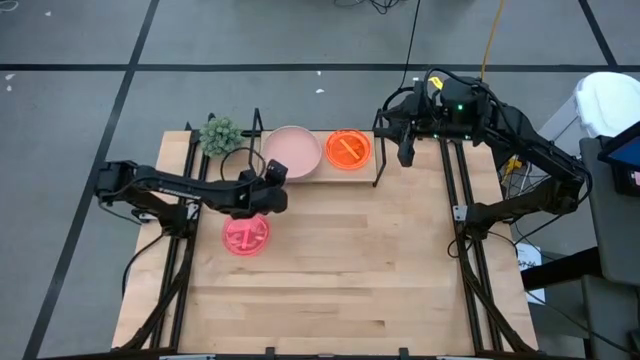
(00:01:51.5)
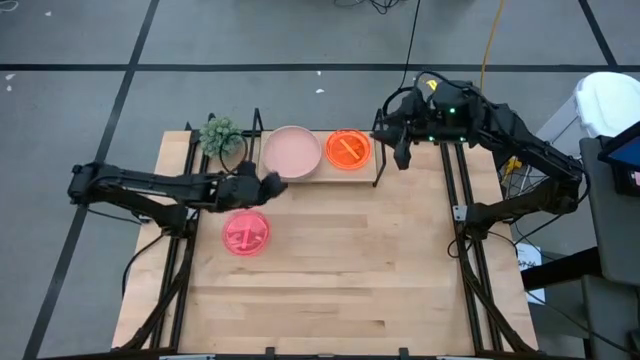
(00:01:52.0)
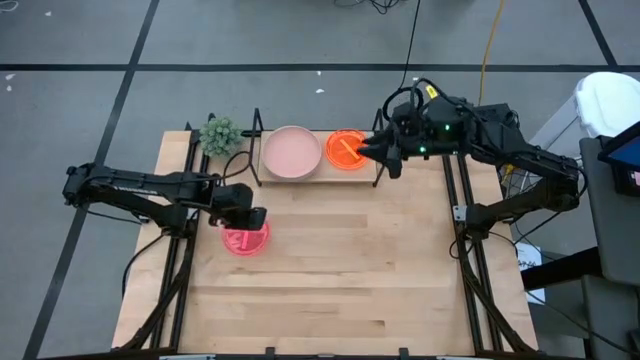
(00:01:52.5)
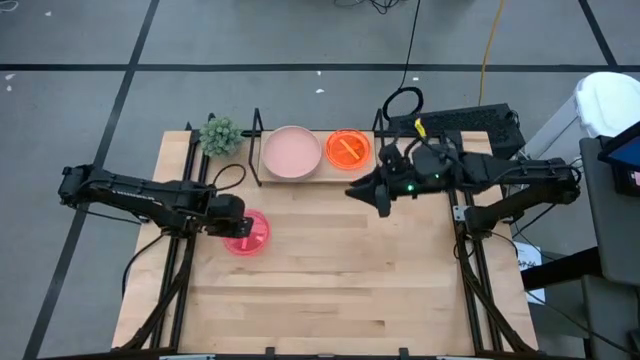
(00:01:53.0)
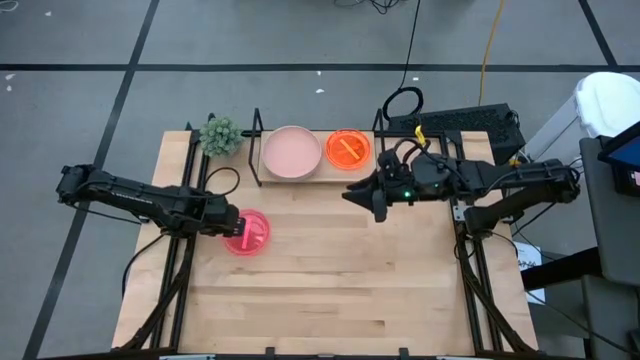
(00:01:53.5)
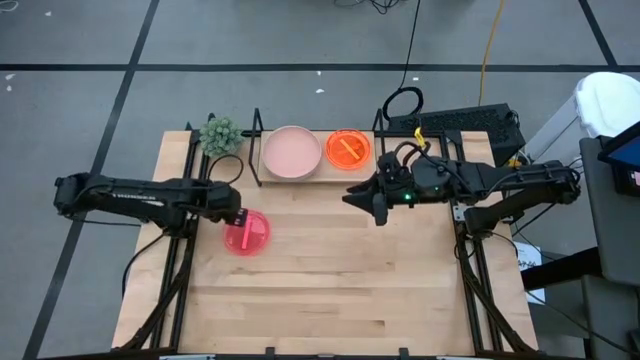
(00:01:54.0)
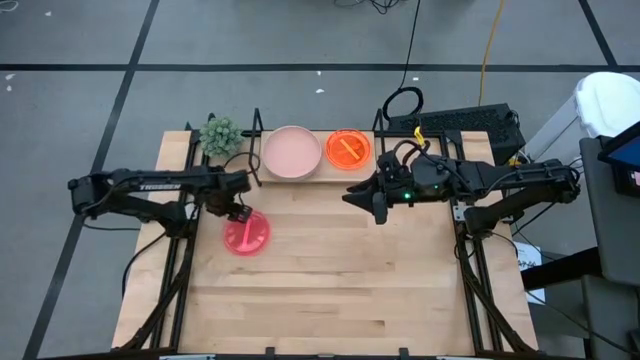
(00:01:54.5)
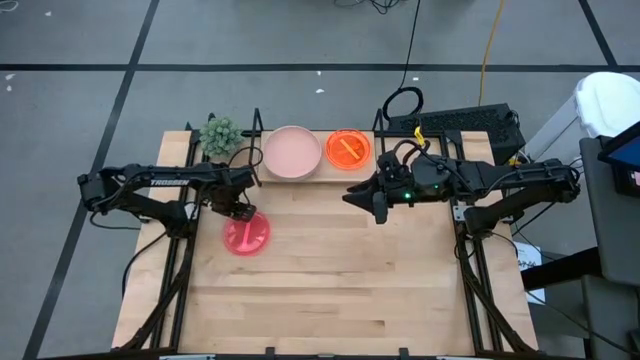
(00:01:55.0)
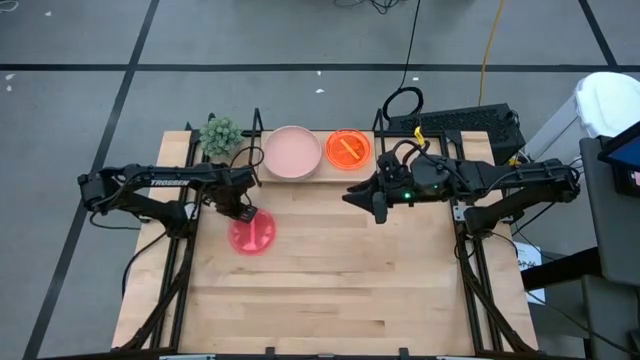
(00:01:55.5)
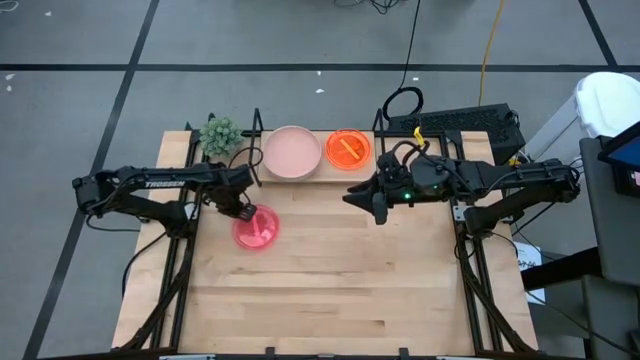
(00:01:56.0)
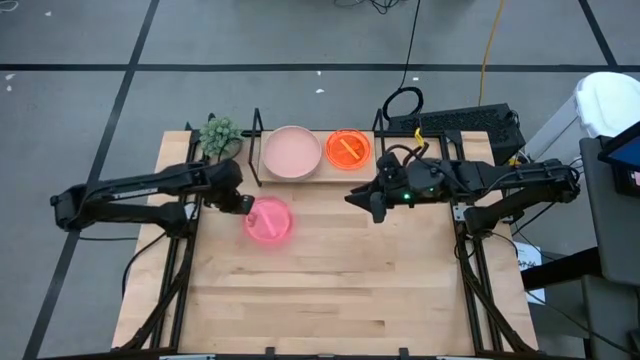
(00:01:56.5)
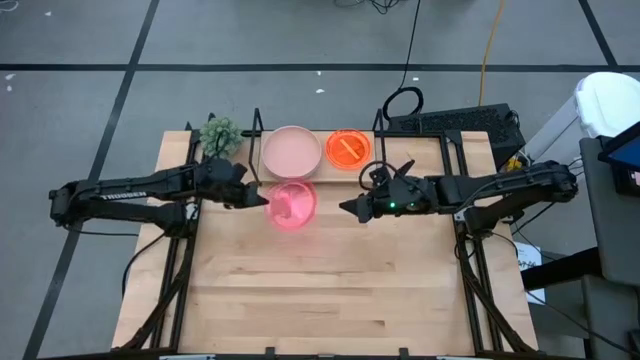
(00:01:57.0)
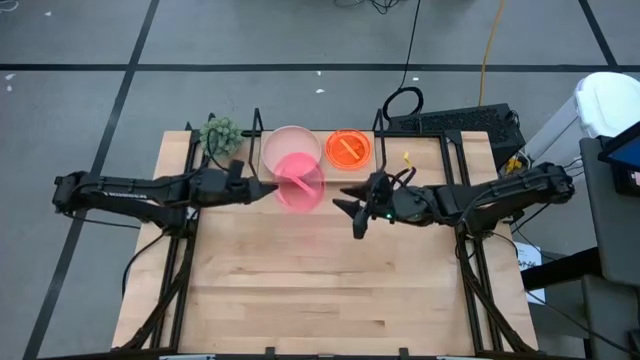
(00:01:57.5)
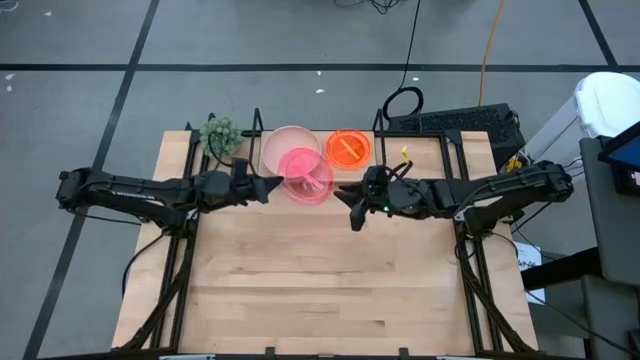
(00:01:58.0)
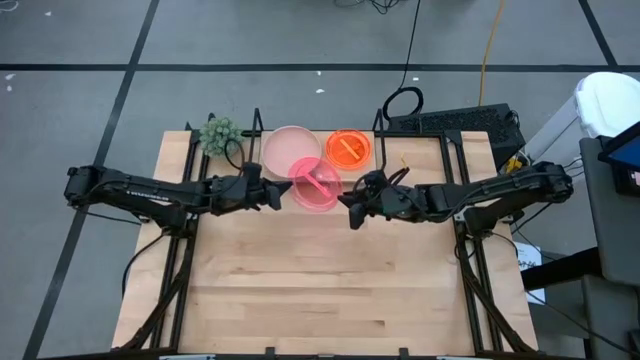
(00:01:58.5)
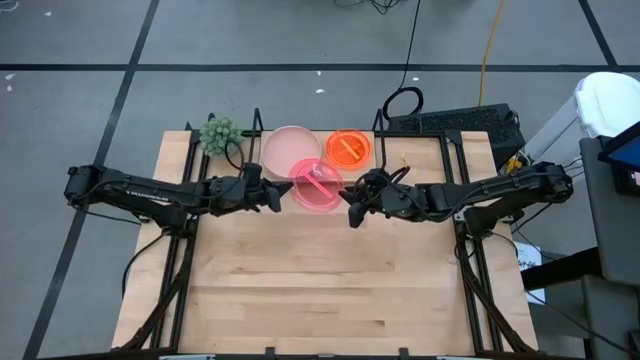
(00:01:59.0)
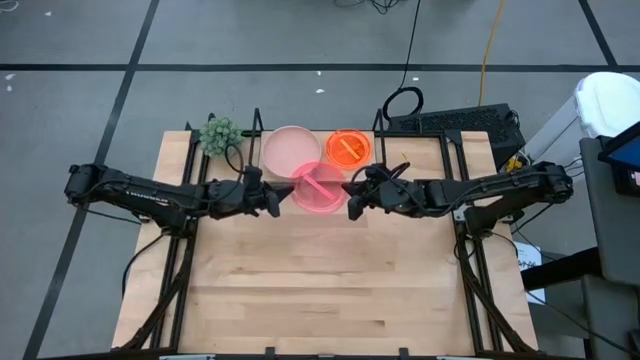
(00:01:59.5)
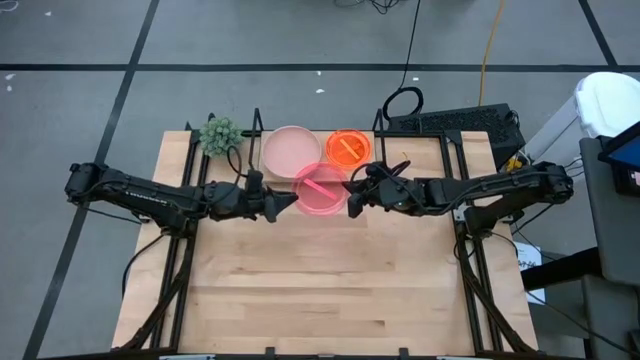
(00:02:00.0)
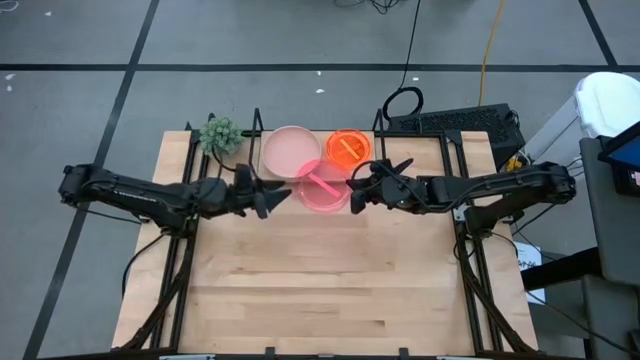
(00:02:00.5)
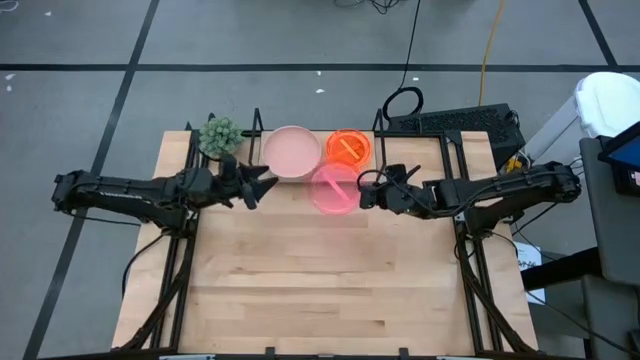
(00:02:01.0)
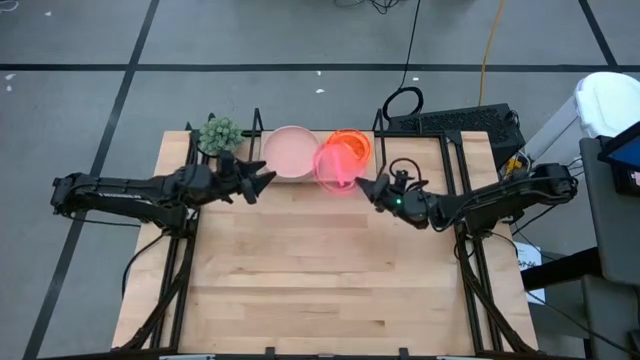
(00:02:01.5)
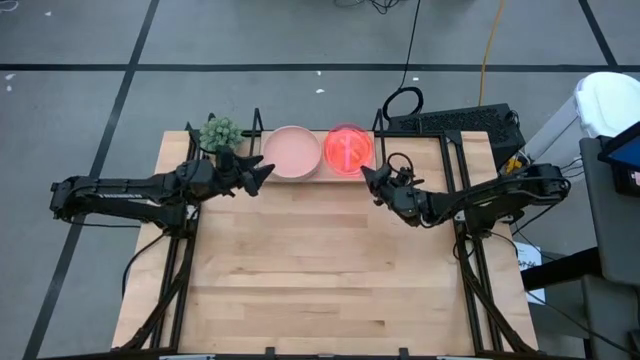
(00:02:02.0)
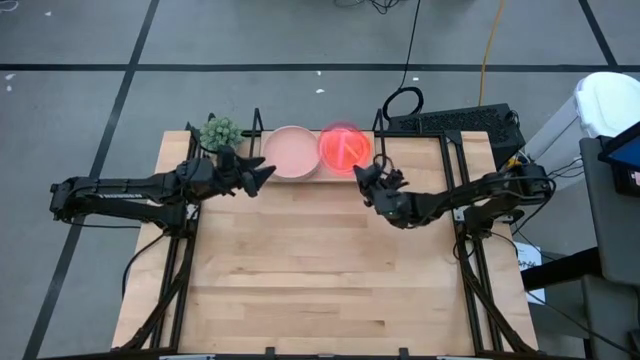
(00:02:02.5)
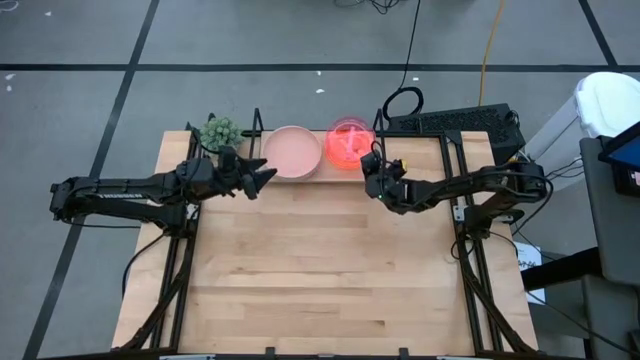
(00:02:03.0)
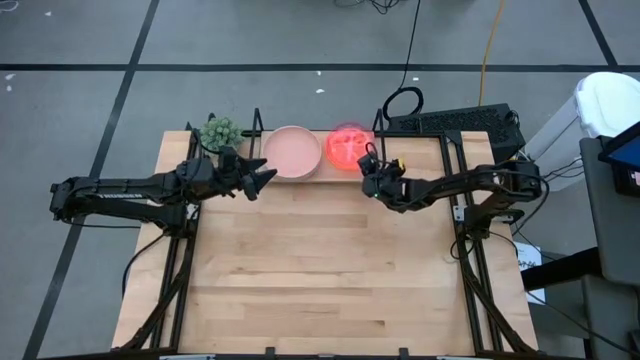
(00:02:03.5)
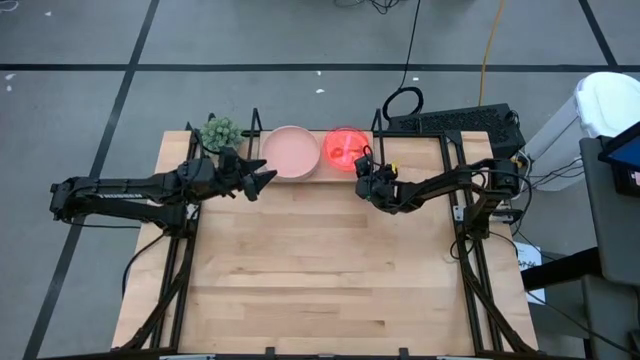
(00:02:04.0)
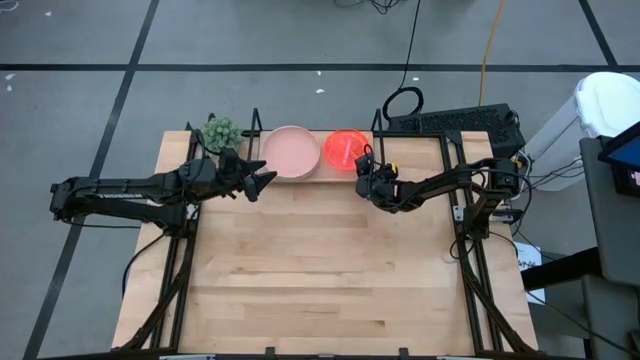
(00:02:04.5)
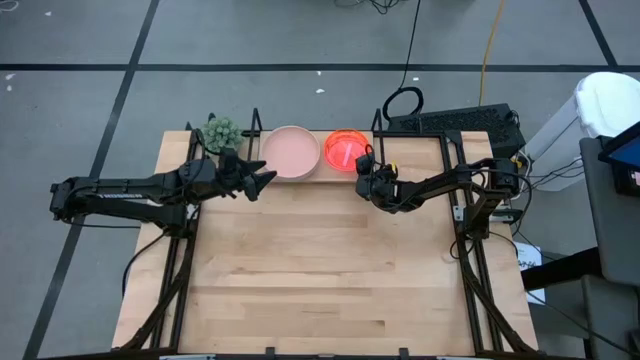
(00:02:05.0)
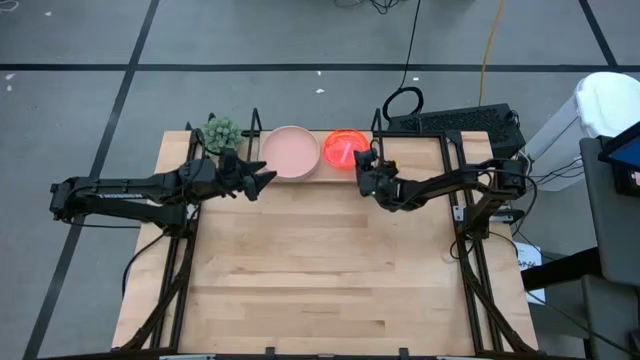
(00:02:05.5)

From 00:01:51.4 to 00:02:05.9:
Task: Place and stack plates onto a shelf
Stack the red transparent plate on the orange transparent plate on the shelf
